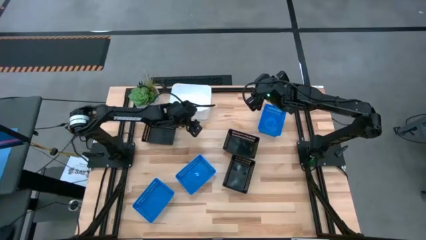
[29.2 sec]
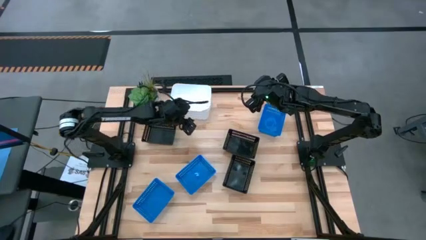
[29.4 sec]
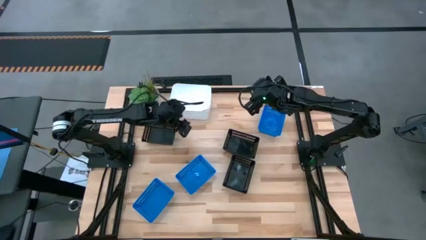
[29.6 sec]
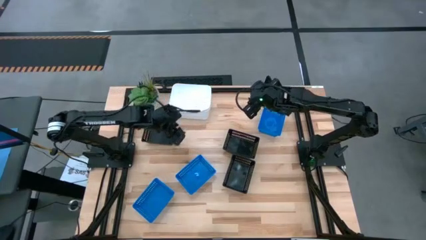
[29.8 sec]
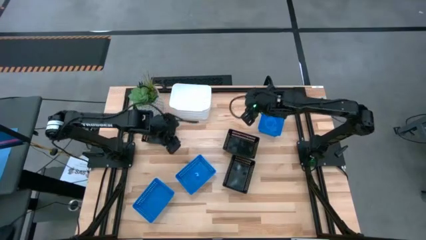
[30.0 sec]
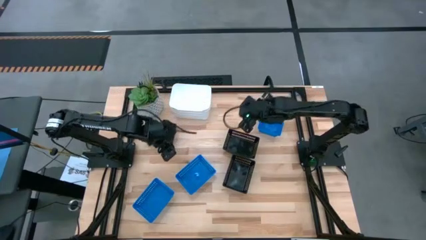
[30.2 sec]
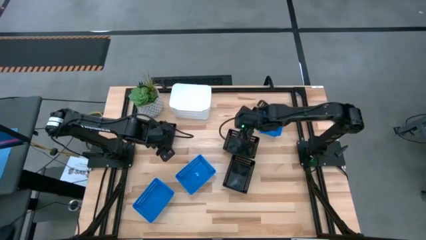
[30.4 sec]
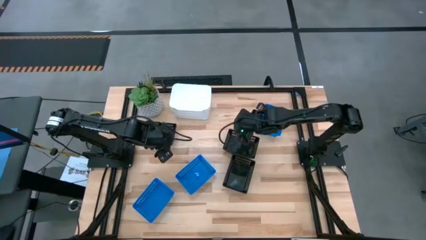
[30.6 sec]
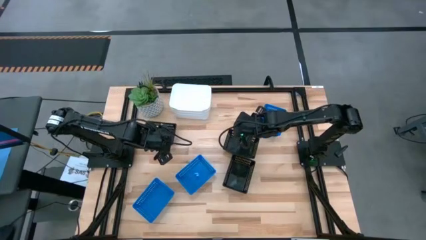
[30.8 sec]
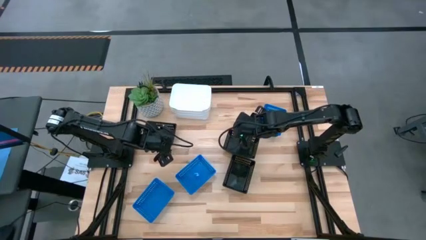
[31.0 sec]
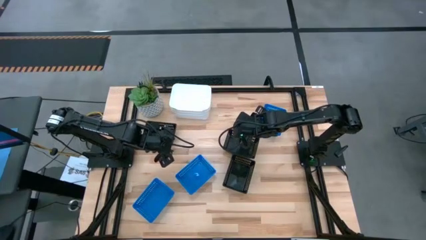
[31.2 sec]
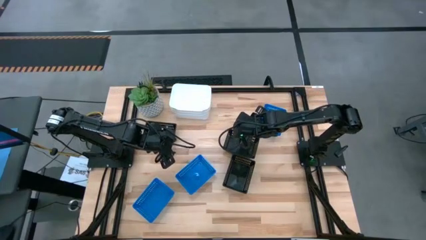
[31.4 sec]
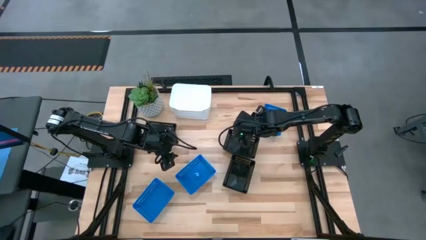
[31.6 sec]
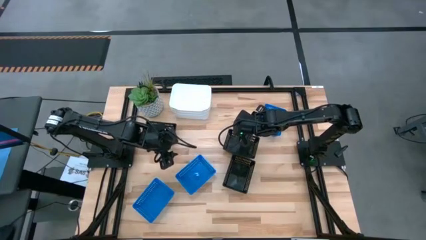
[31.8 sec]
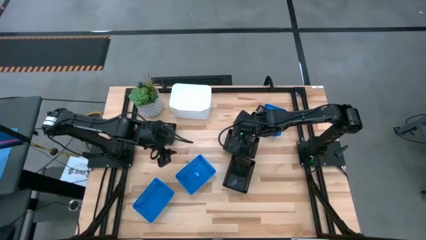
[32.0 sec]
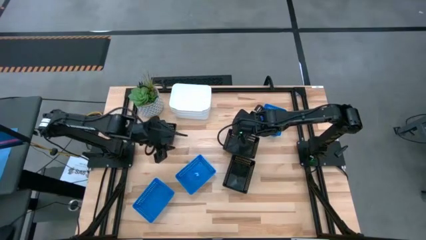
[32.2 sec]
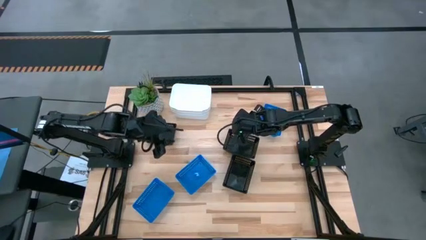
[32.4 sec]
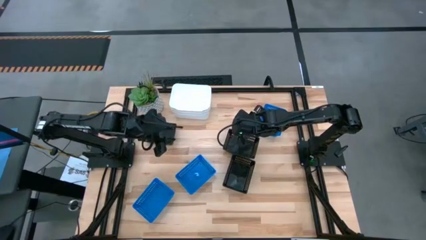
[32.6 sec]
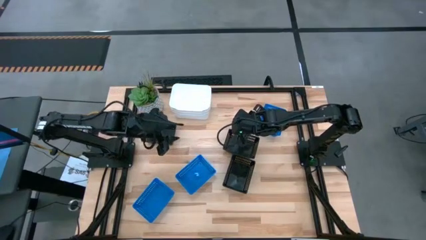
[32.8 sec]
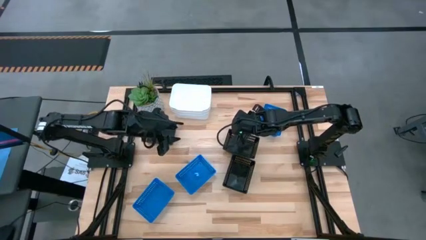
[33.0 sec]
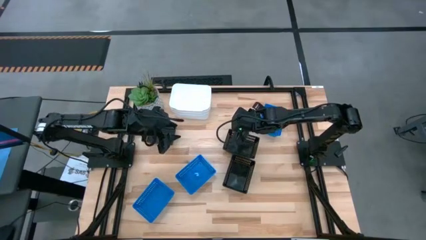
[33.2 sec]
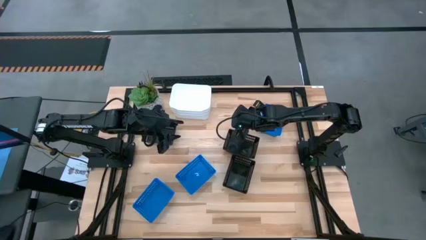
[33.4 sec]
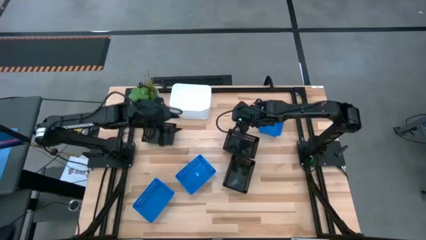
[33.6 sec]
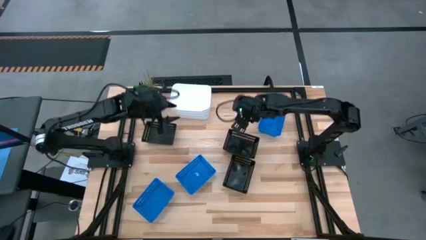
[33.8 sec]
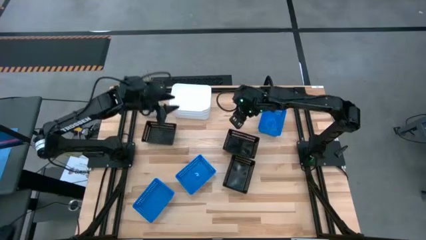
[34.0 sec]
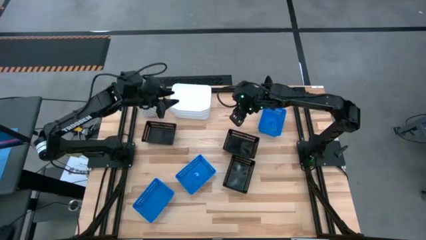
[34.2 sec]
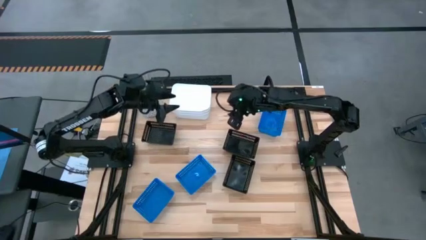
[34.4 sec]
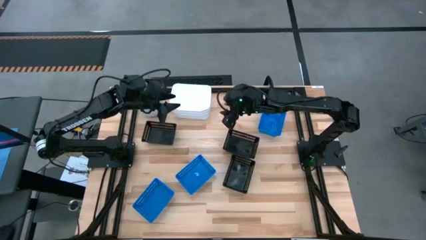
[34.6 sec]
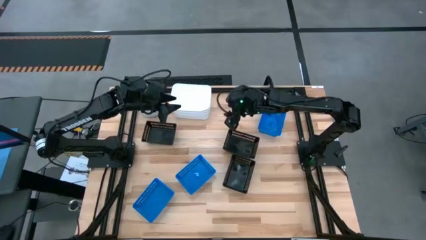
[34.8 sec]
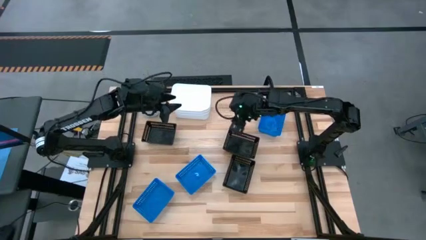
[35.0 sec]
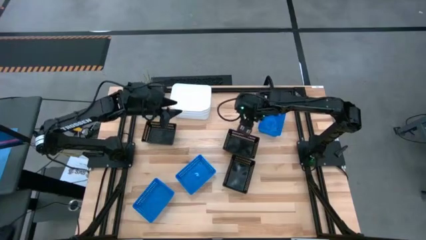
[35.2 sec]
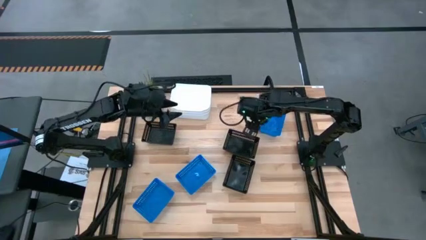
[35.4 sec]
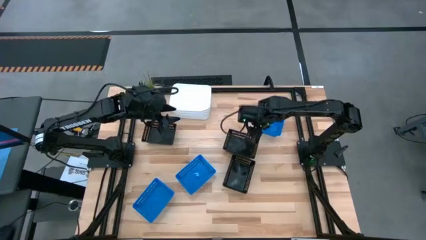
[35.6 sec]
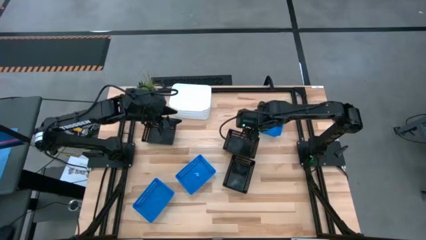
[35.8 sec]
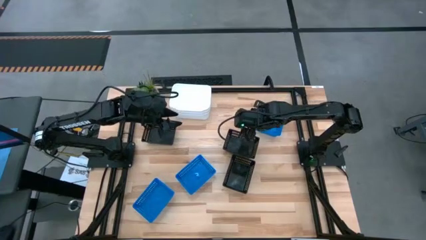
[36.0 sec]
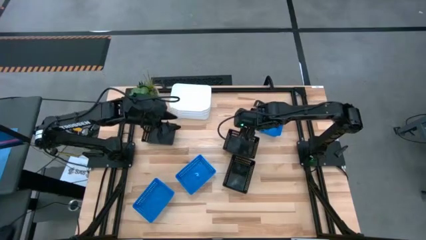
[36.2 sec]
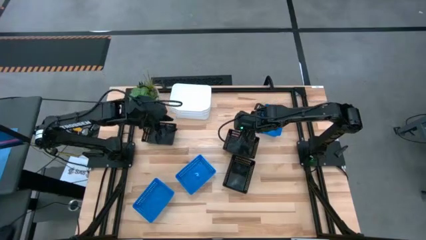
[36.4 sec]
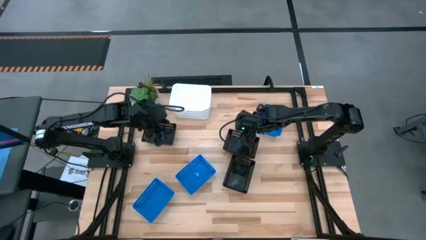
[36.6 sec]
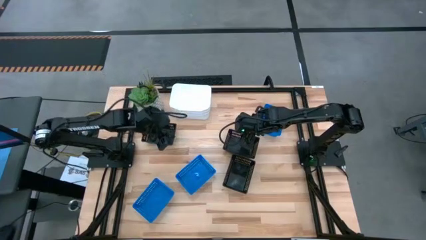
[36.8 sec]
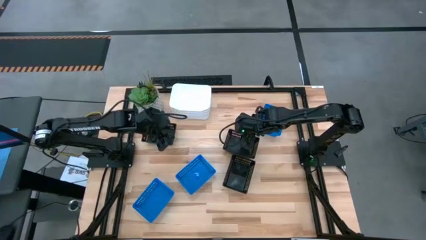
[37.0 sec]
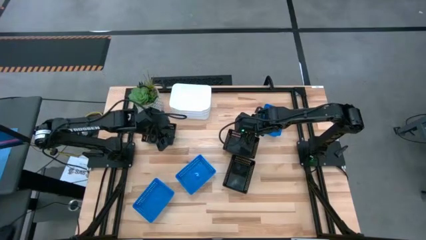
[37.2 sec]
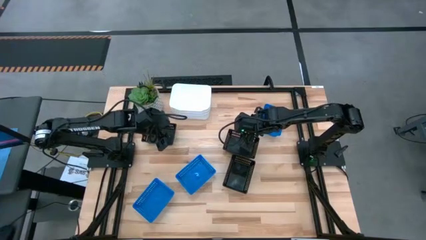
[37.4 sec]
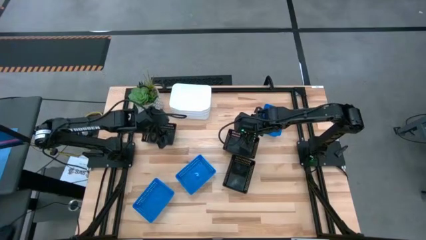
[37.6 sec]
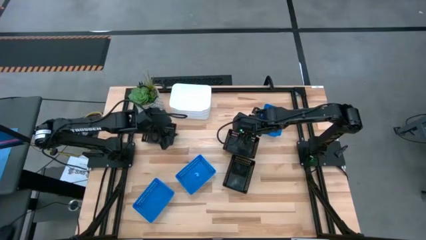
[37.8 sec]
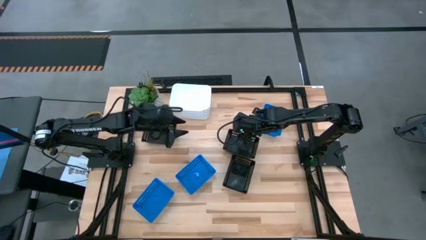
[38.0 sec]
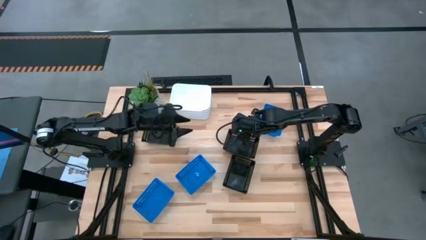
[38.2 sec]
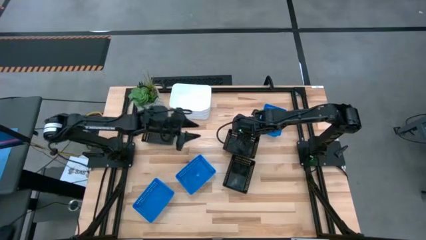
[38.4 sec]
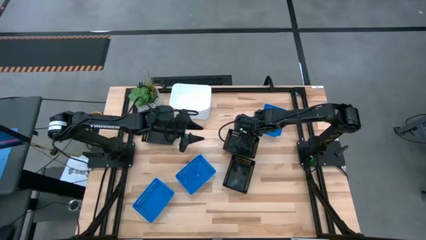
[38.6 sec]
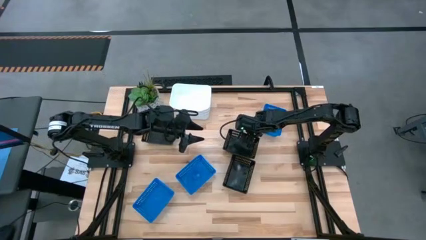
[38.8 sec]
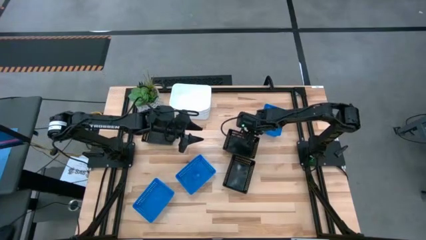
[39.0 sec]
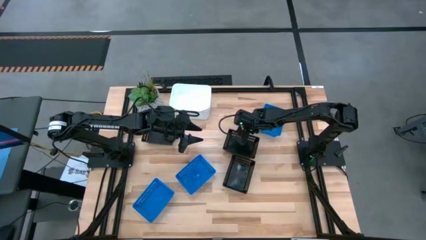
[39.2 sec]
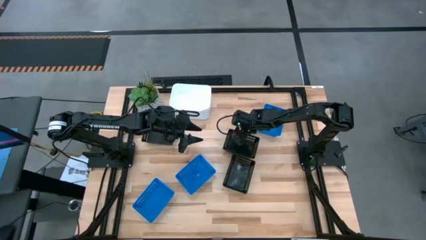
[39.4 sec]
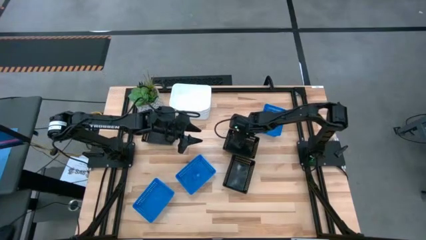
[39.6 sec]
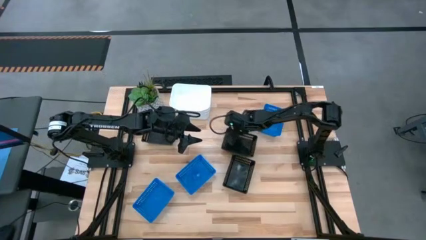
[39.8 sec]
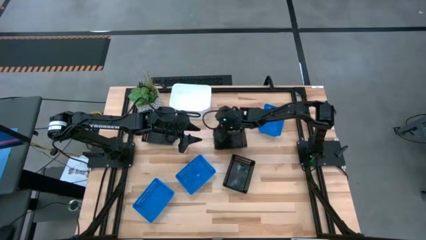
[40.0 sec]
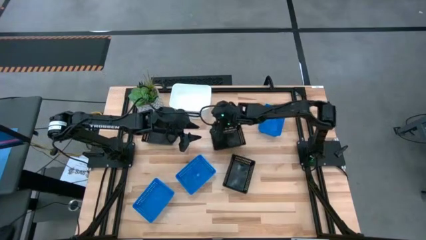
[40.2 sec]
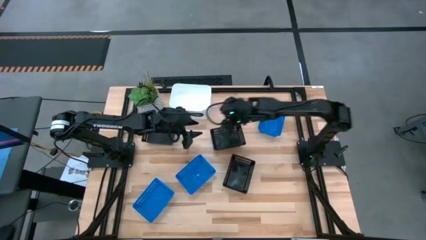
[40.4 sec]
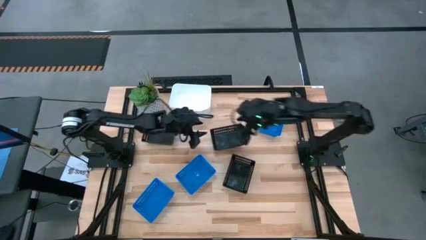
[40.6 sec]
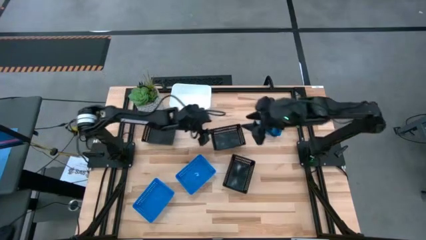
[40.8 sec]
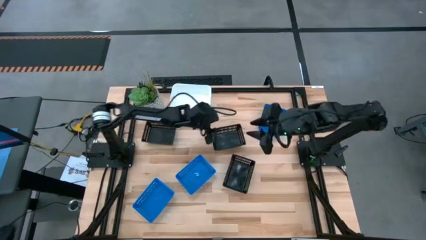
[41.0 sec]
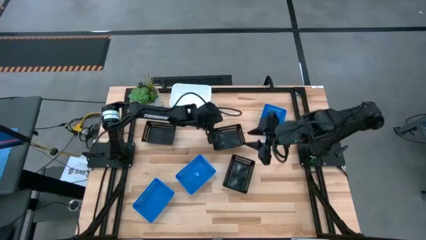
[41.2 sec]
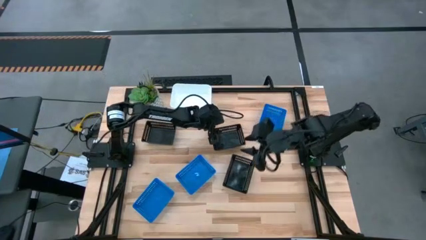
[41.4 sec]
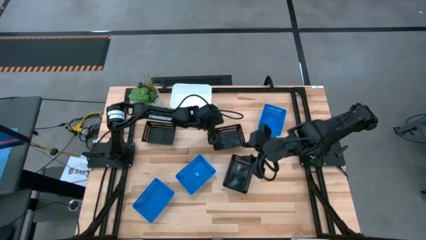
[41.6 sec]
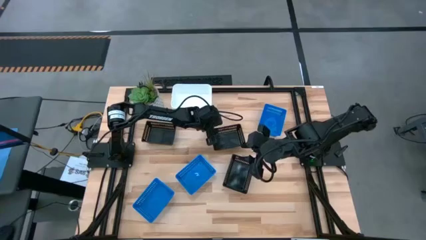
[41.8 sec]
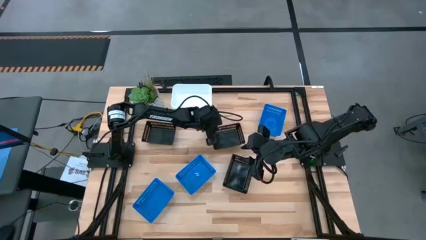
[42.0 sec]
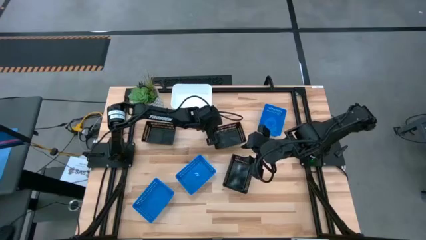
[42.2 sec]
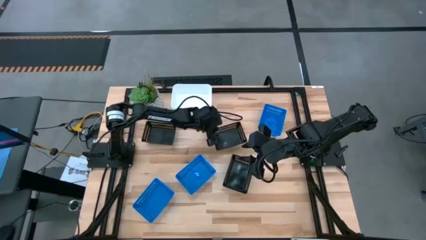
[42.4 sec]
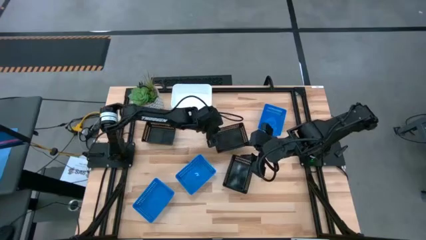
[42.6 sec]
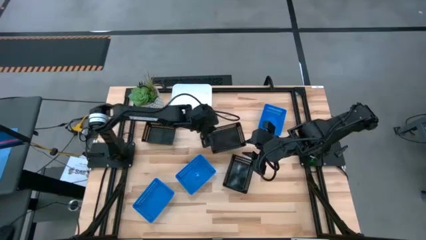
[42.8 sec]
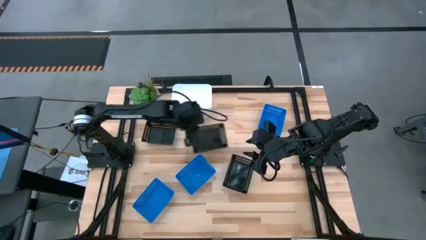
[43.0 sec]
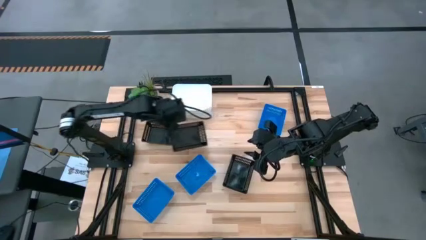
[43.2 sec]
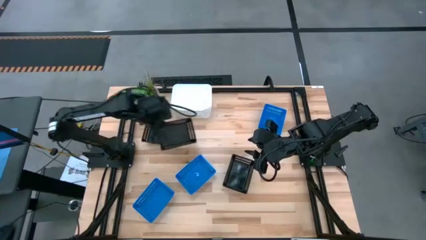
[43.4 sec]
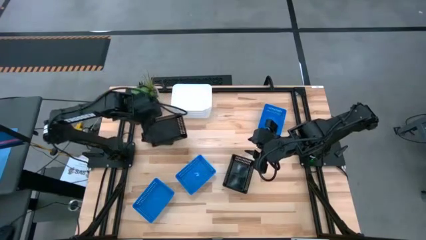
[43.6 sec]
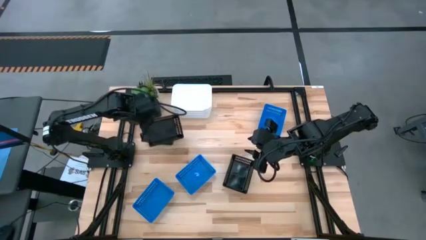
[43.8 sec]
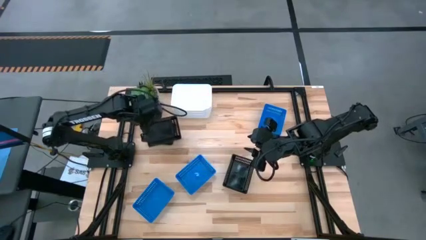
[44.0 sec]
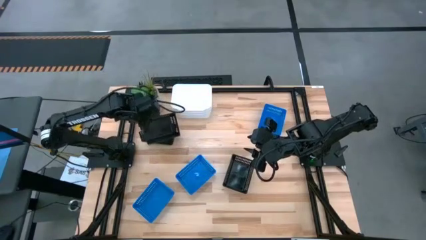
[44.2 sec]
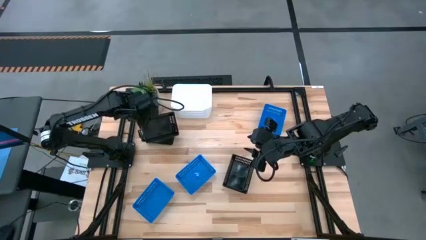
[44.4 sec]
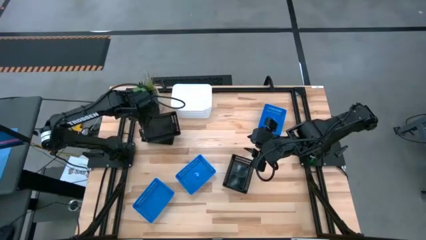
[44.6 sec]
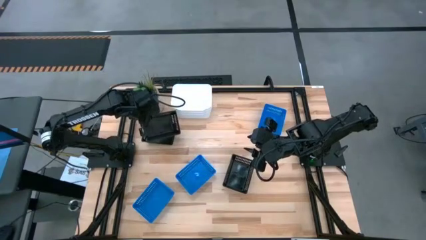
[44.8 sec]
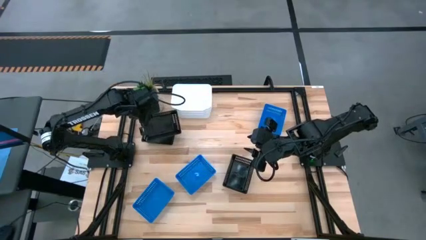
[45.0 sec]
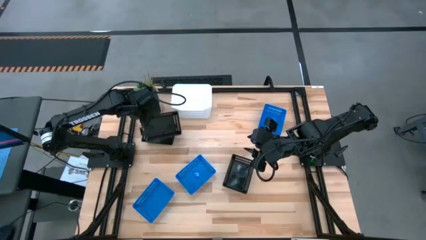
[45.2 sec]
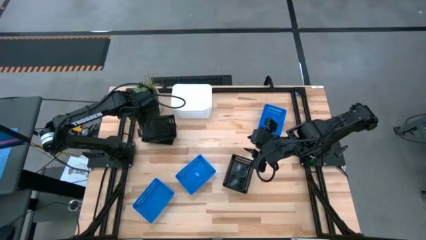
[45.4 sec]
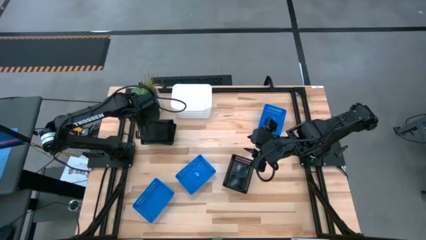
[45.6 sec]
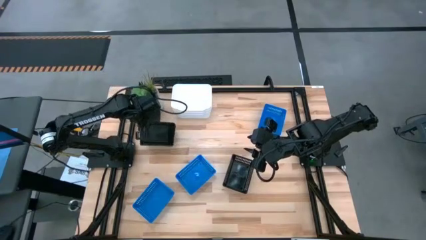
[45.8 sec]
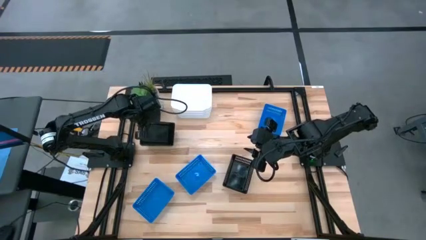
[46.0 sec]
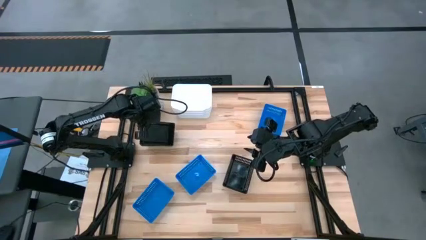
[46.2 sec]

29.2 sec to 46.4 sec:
Stack the top right black bin on top of the top left black bin
